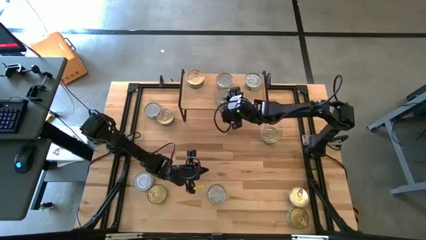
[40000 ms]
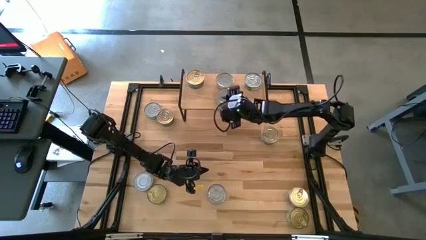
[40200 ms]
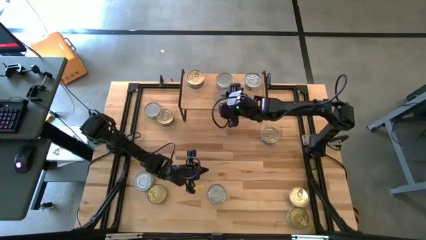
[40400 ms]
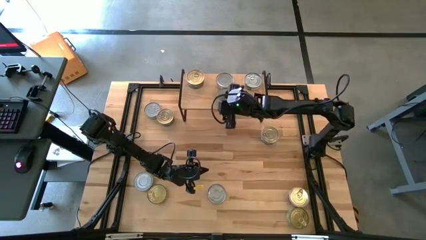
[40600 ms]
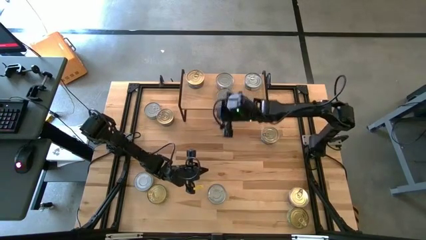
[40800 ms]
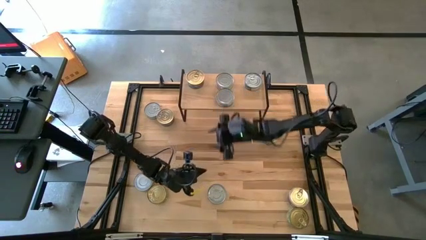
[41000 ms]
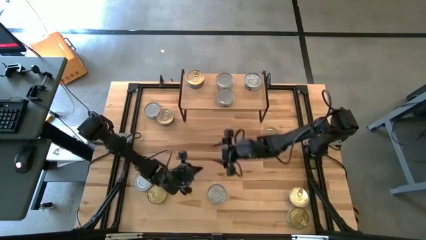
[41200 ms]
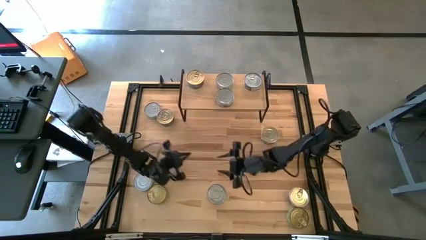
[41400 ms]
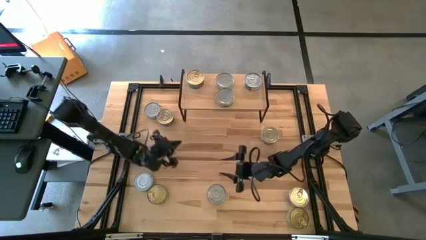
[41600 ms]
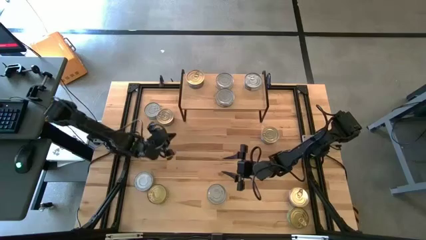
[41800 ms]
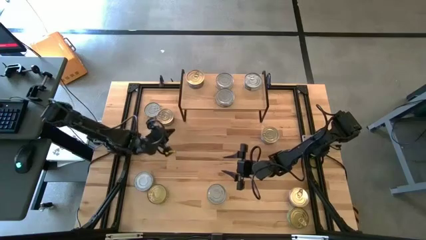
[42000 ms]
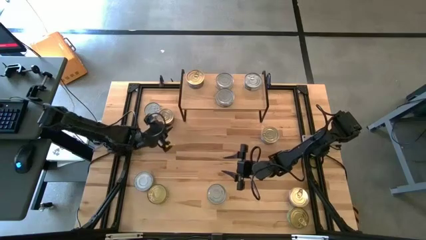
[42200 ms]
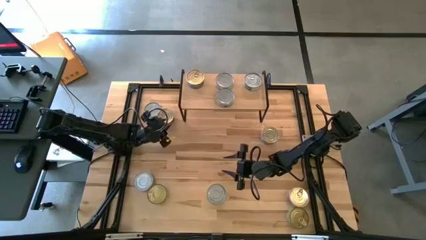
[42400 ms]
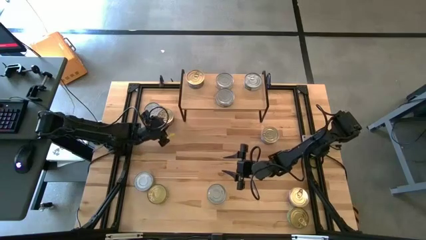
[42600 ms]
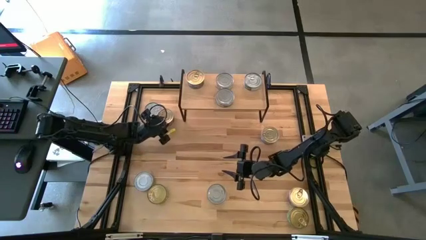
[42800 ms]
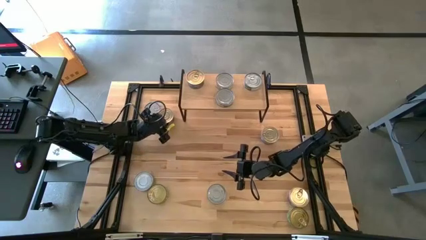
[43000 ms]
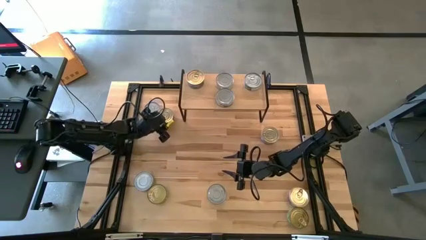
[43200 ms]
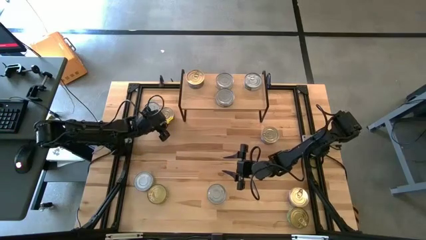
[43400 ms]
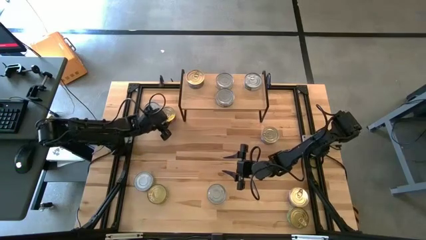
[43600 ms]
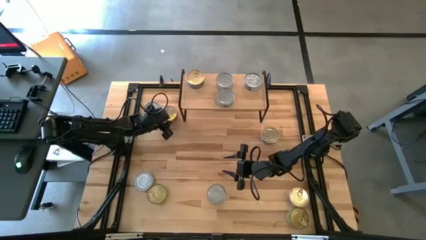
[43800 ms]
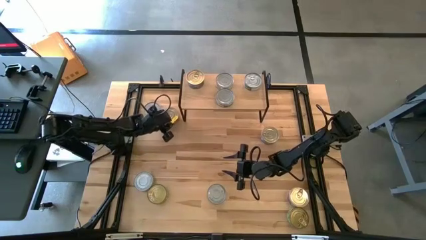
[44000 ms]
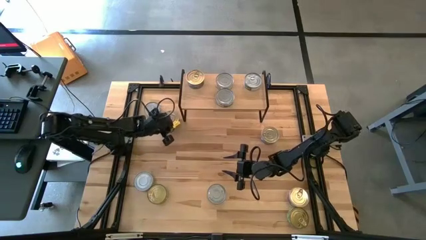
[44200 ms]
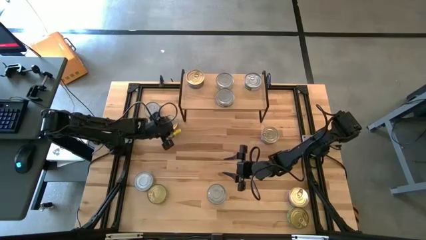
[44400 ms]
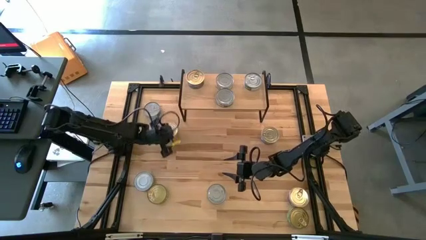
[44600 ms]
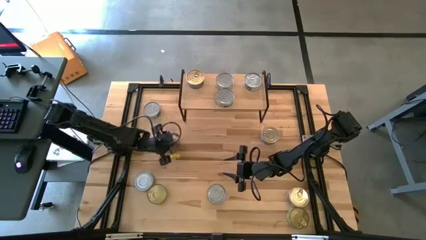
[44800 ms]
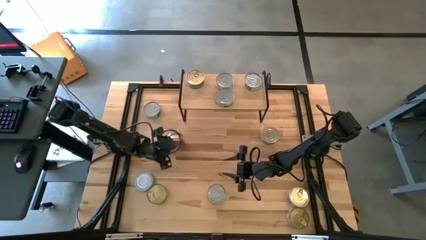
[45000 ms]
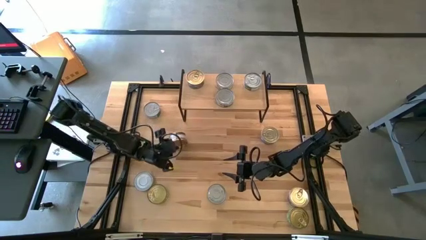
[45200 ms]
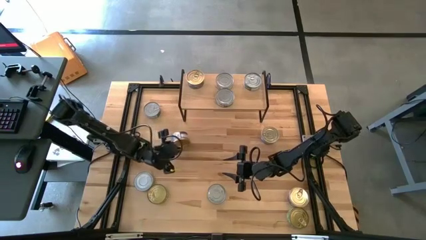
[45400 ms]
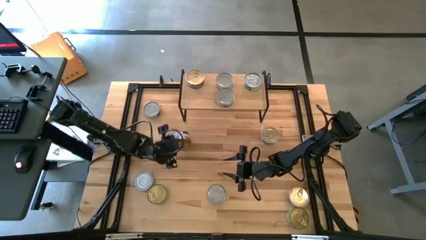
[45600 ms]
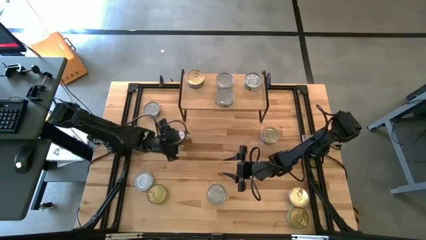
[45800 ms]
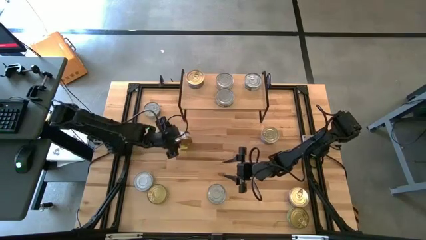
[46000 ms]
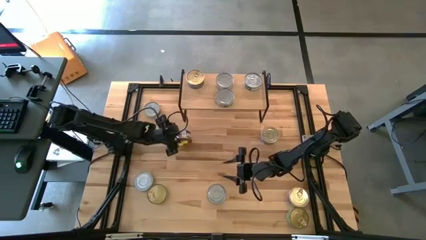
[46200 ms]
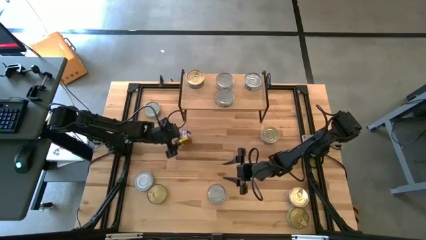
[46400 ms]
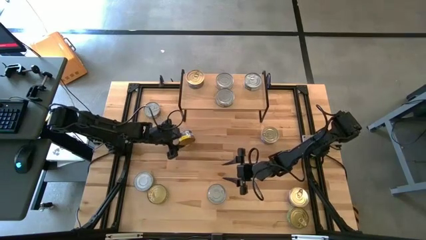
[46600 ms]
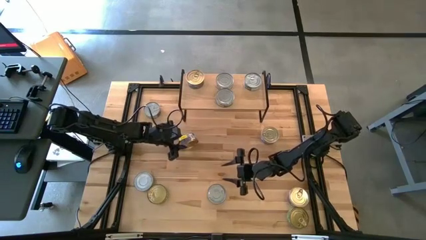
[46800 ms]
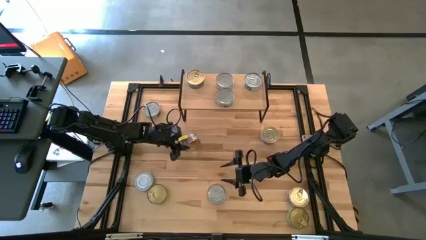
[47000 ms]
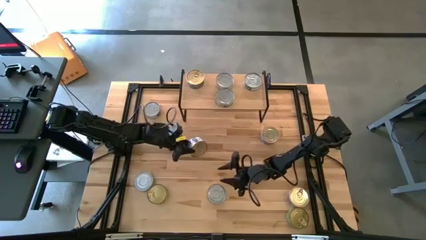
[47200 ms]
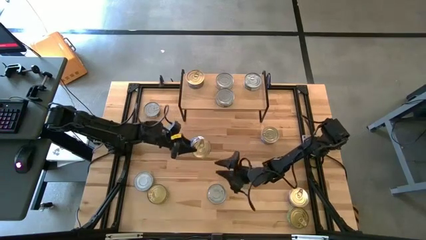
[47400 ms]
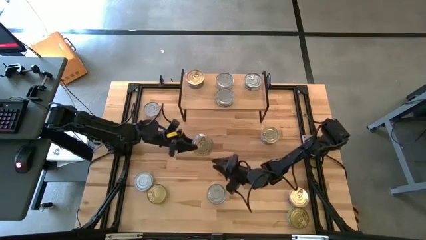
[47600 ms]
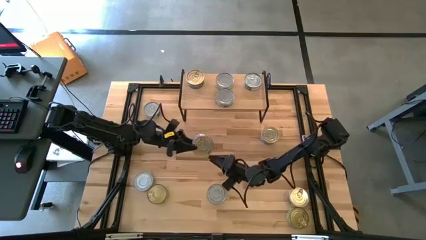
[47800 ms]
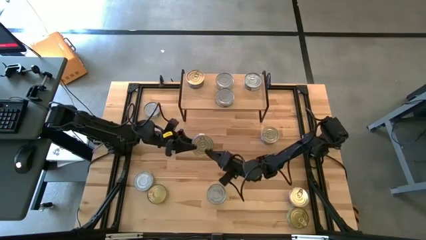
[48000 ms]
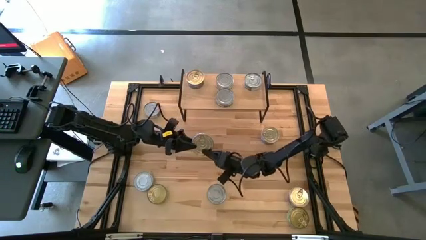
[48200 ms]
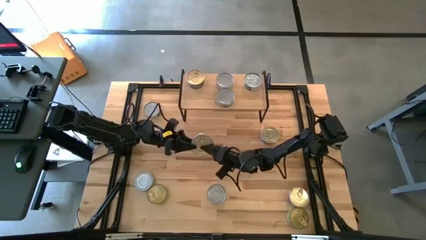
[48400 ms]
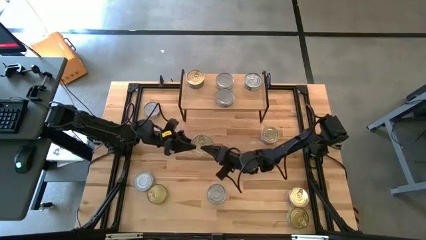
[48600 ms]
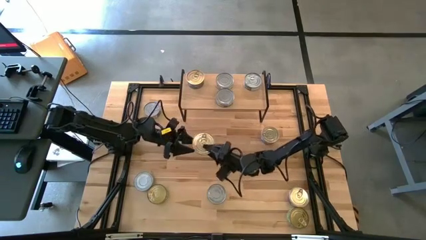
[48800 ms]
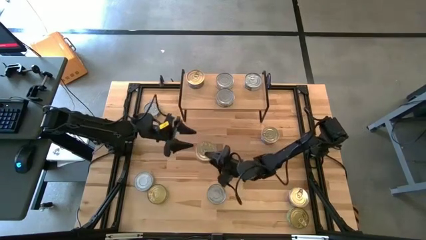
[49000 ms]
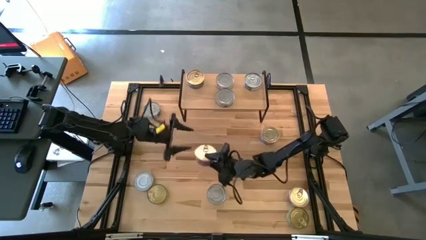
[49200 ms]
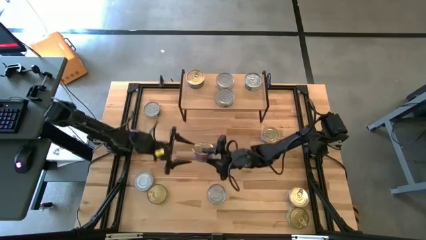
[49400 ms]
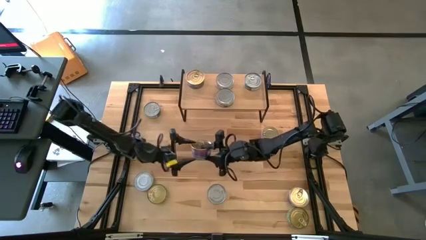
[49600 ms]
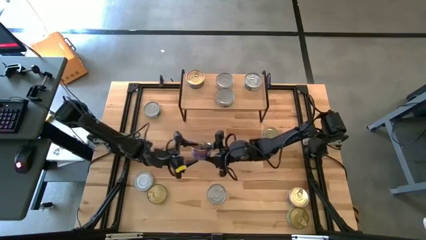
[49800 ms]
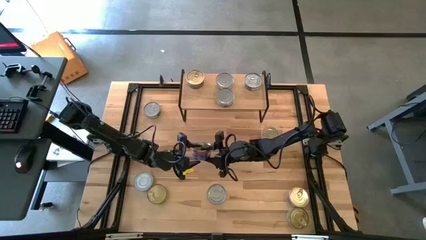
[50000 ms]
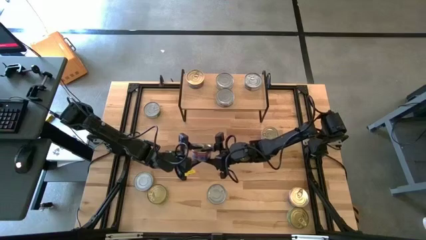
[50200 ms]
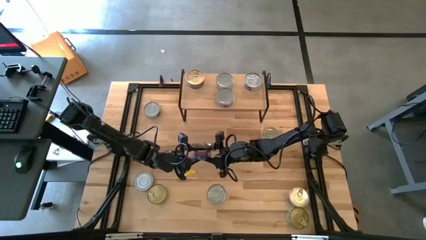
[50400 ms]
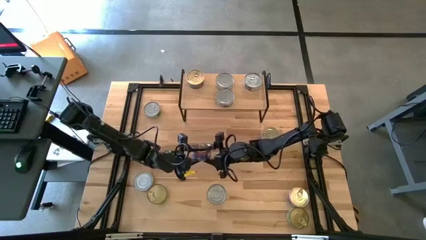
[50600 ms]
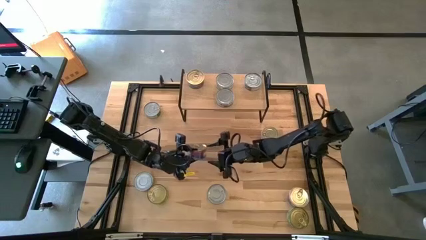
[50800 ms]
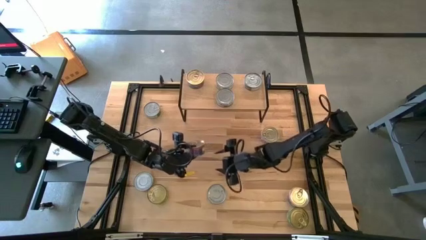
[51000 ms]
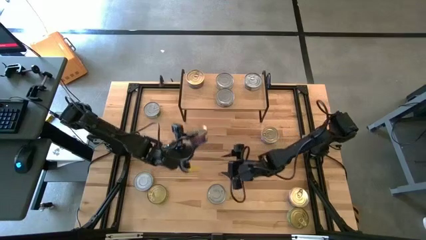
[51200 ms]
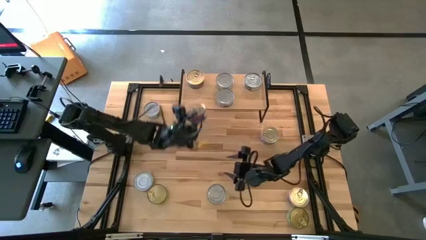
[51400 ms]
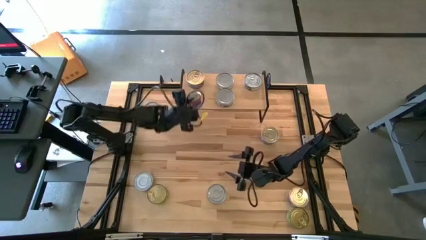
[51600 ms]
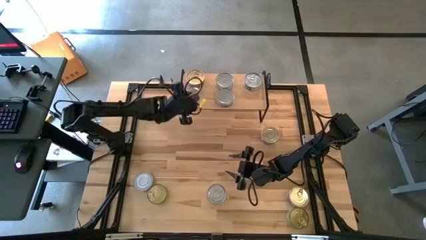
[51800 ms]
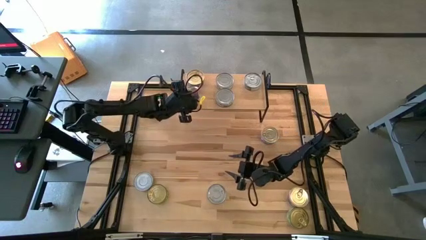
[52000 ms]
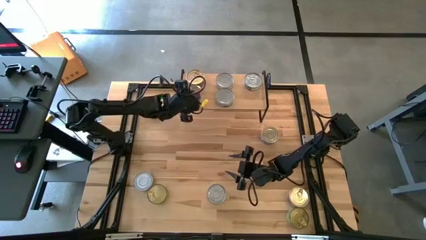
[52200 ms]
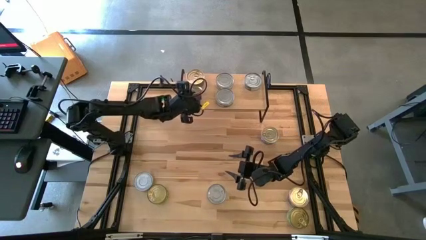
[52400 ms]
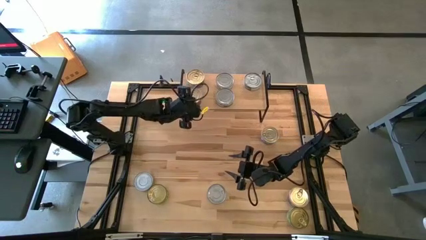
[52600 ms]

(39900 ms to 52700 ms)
Task: Stack canned seafood by type on shelf
Put the blue pink tuna can aligned with the other blue pink tuna can on the shelf

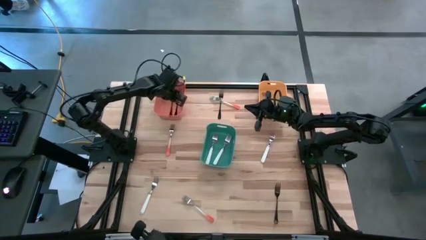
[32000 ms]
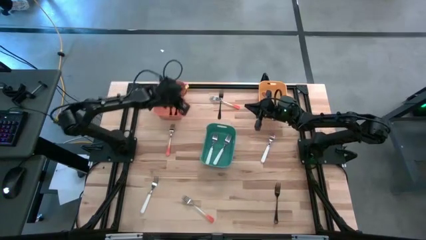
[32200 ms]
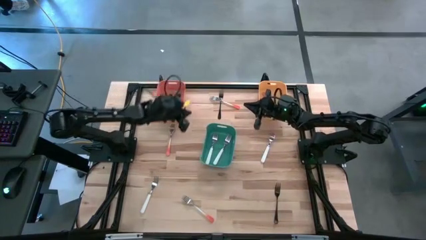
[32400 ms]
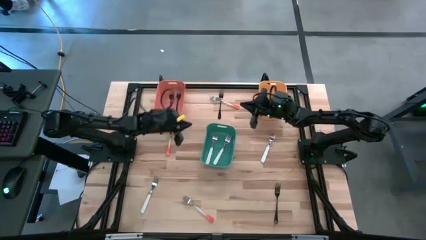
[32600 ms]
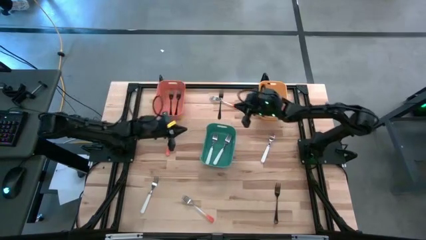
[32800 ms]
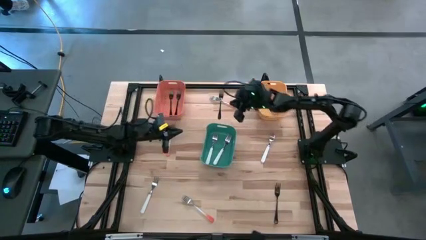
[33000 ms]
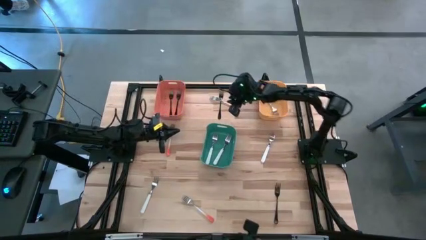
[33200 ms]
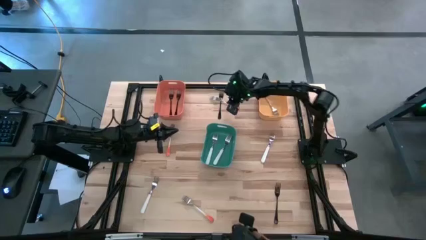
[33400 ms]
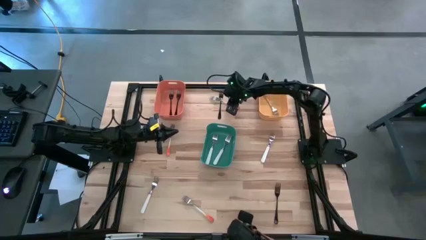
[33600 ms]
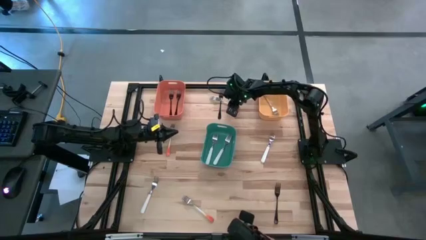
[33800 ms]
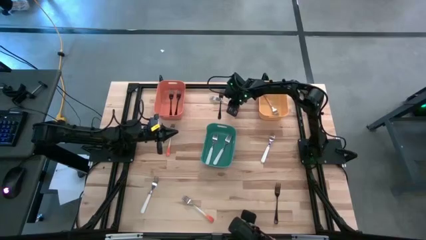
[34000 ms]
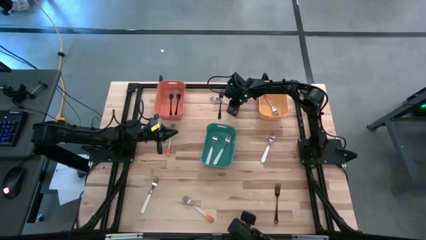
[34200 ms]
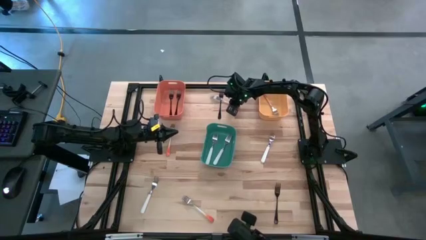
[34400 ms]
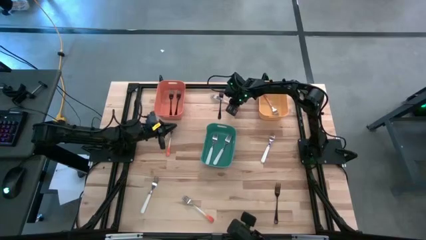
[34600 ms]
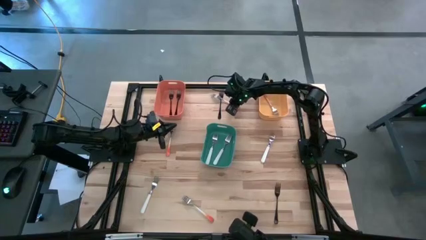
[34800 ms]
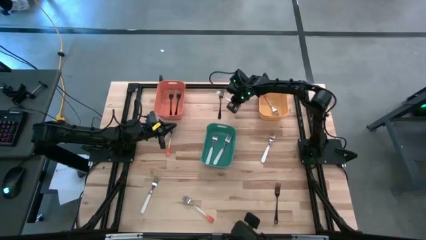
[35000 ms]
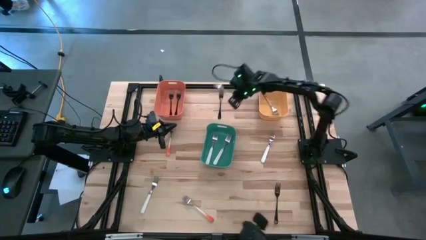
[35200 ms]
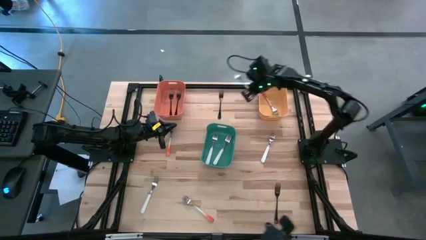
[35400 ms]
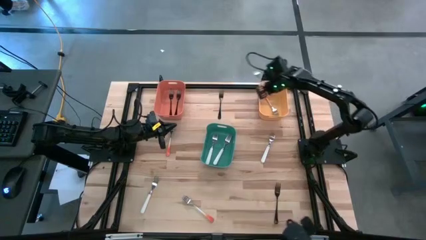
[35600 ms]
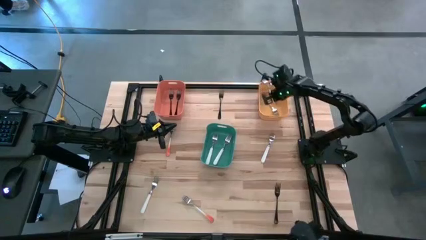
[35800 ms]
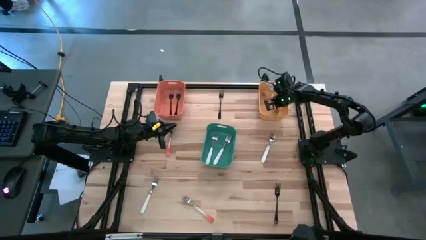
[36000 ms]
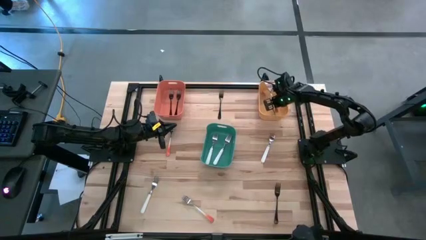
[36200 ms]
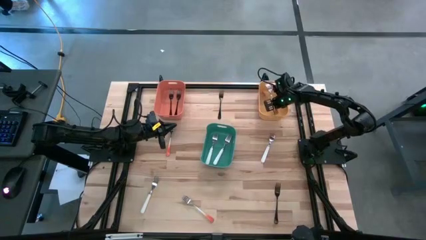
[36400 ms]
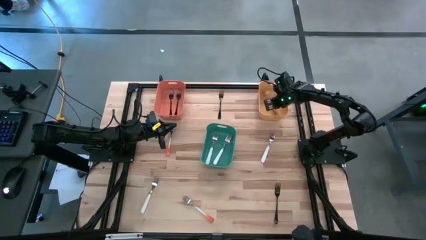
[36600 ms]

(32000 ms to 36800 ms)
Task: Sort silverware by color (type)
Put the top center orange fork into the yellow bin

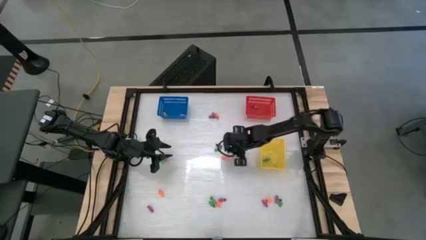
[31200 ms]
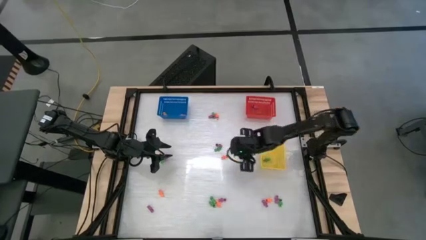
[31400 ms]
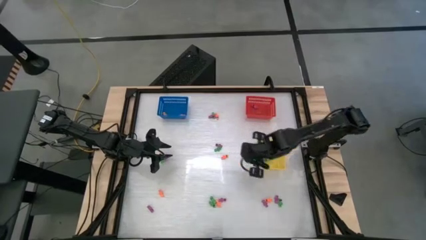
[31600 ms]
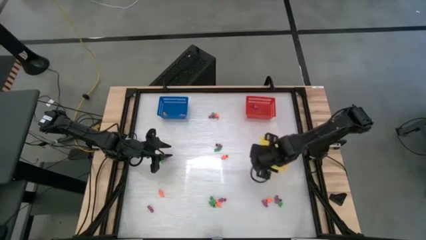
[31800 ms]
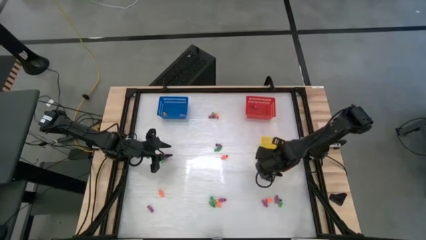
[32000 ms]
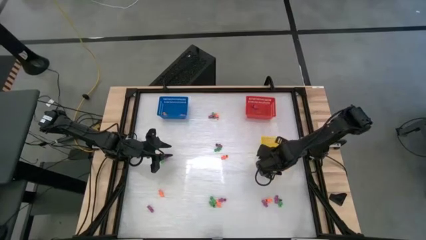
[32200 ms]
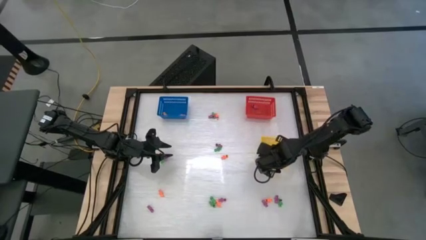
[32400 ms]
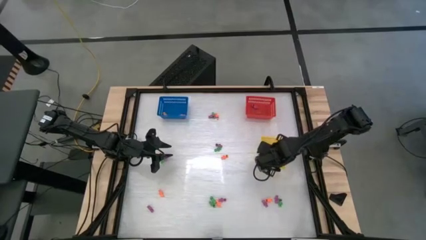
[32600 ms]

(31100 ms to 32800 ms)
Task: Sort Halloween decoration
Put the green skeleton toy into the yellow bin
